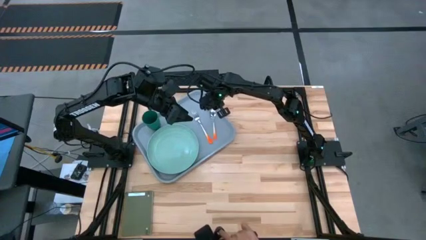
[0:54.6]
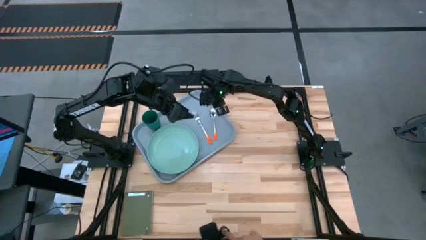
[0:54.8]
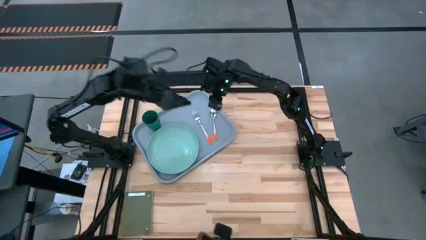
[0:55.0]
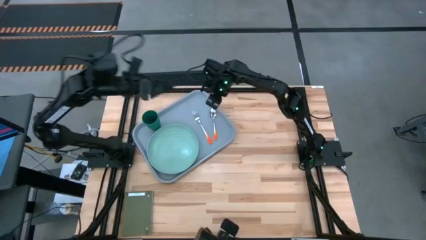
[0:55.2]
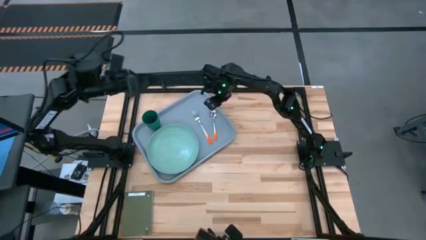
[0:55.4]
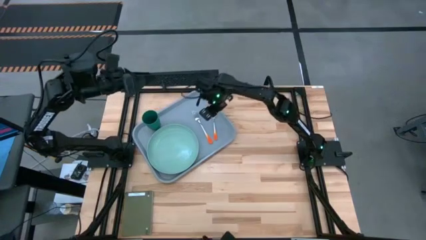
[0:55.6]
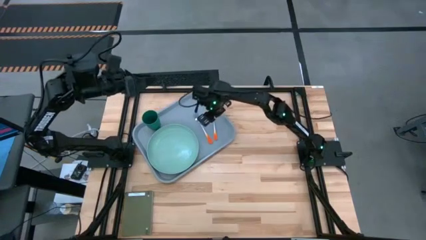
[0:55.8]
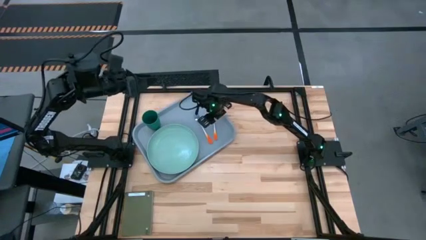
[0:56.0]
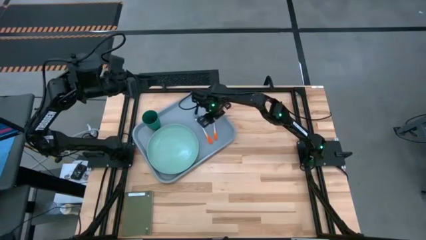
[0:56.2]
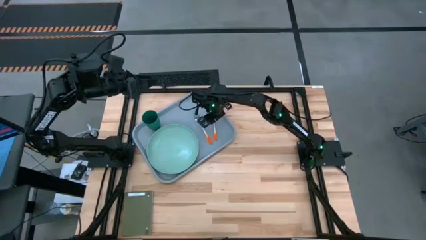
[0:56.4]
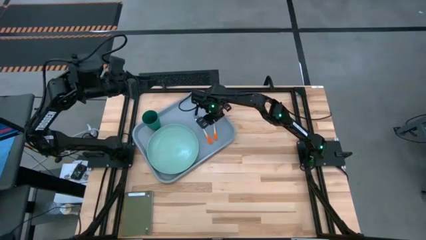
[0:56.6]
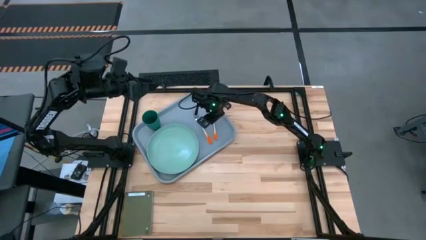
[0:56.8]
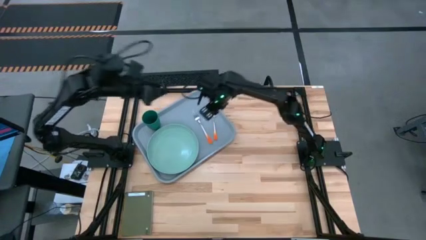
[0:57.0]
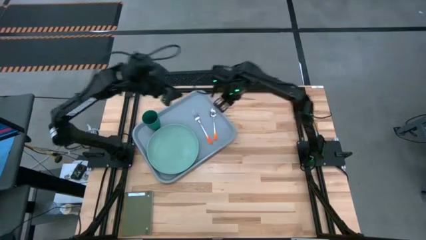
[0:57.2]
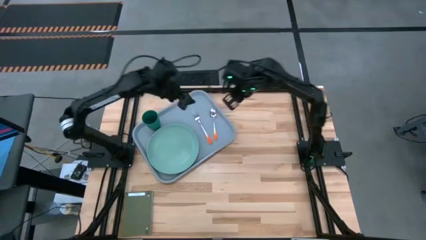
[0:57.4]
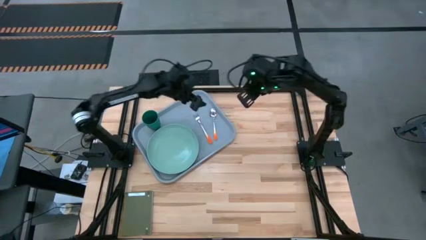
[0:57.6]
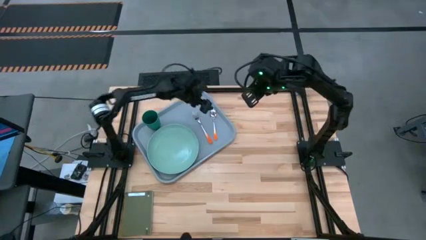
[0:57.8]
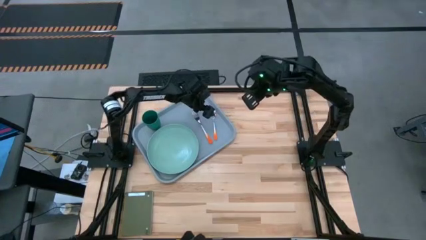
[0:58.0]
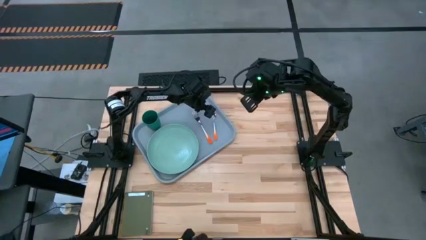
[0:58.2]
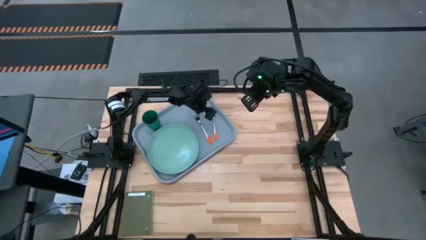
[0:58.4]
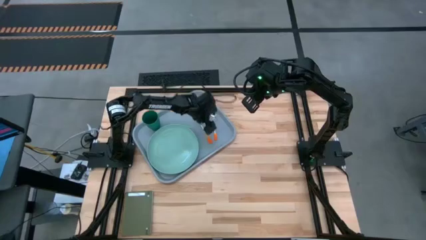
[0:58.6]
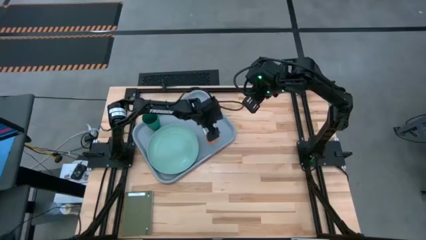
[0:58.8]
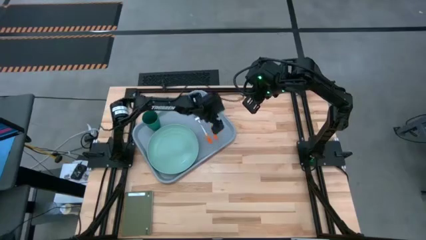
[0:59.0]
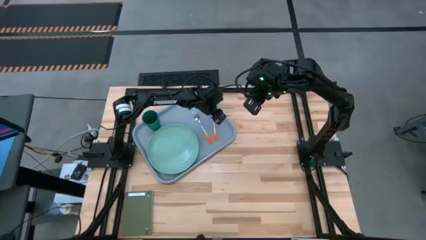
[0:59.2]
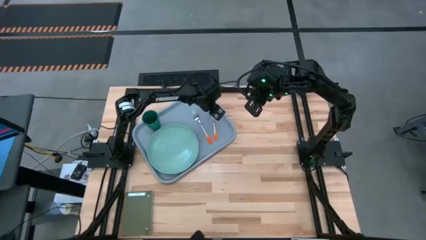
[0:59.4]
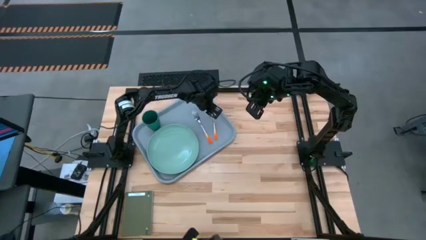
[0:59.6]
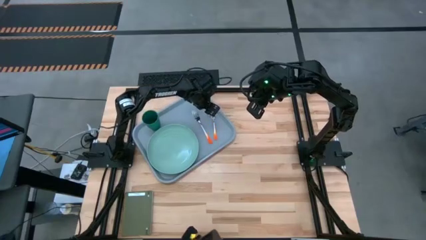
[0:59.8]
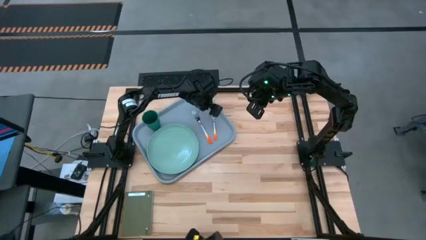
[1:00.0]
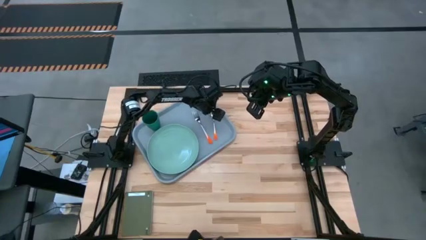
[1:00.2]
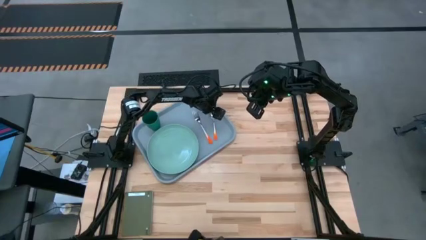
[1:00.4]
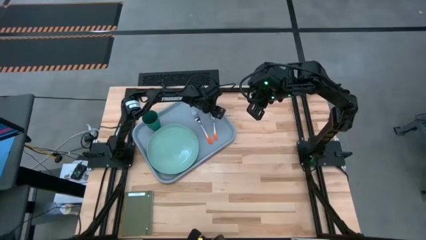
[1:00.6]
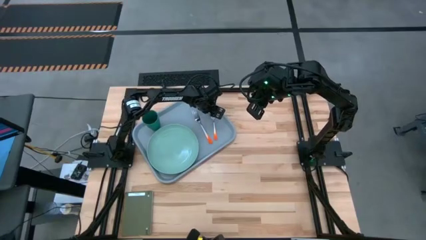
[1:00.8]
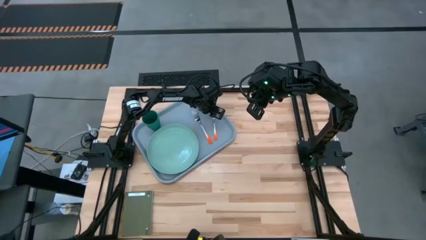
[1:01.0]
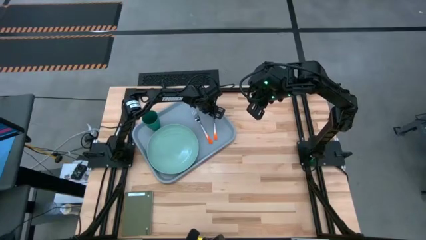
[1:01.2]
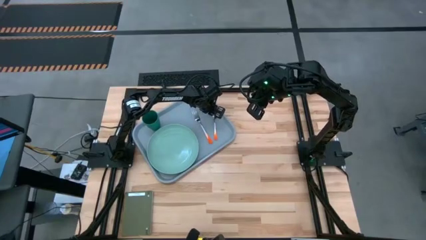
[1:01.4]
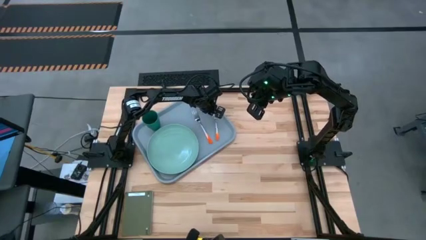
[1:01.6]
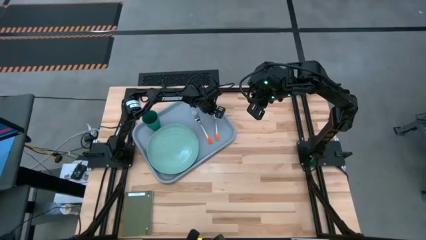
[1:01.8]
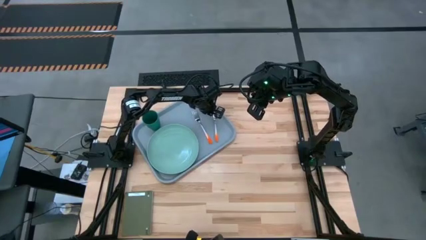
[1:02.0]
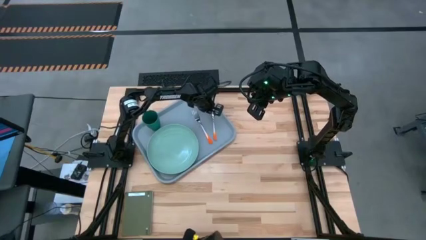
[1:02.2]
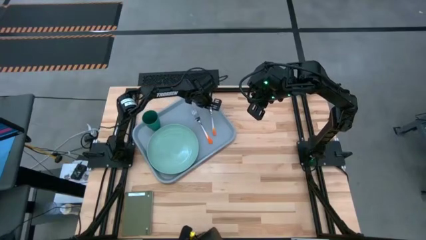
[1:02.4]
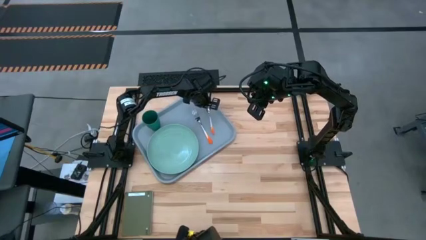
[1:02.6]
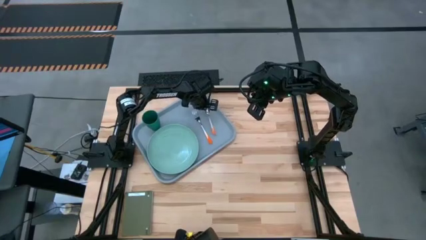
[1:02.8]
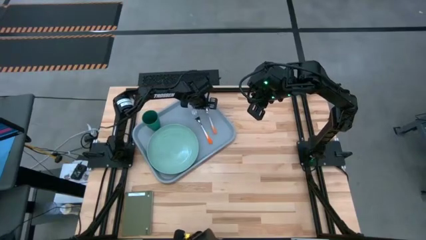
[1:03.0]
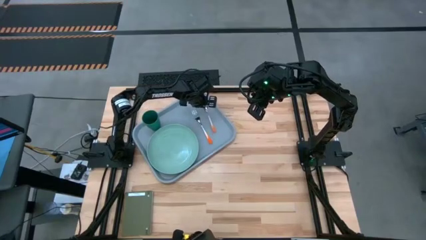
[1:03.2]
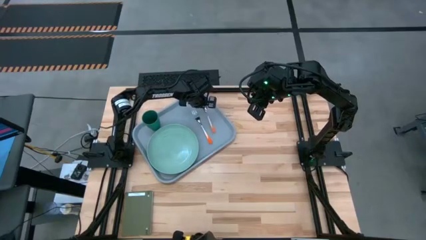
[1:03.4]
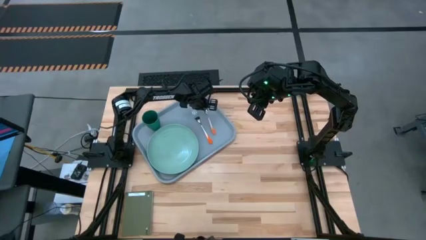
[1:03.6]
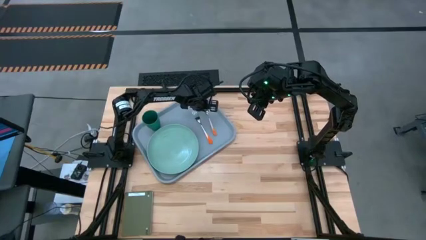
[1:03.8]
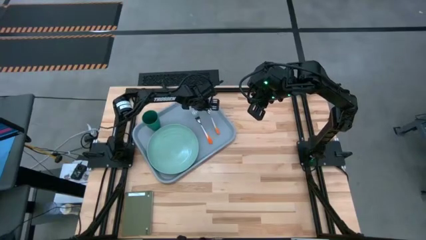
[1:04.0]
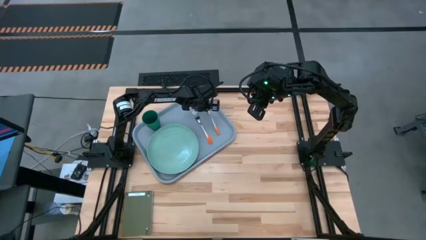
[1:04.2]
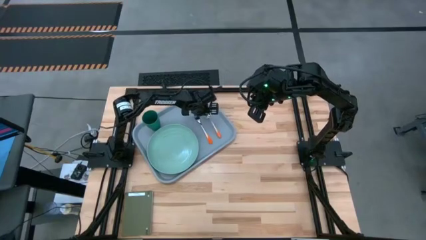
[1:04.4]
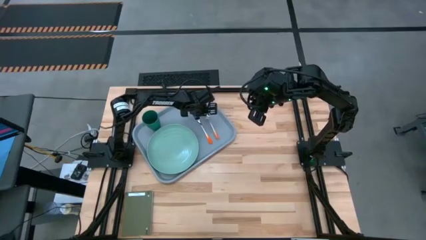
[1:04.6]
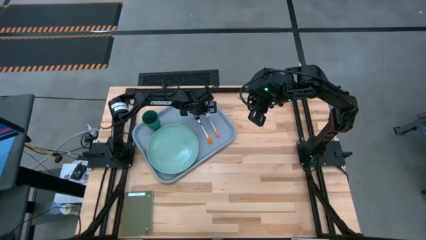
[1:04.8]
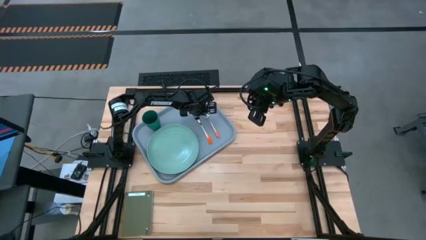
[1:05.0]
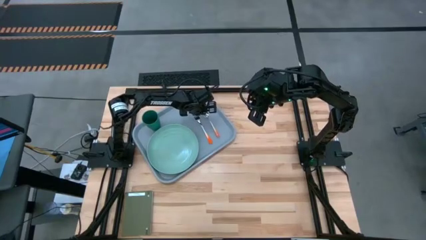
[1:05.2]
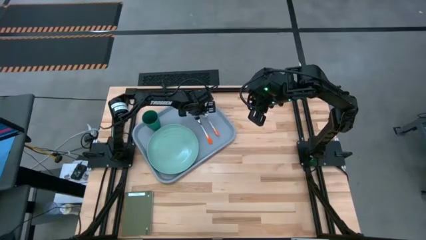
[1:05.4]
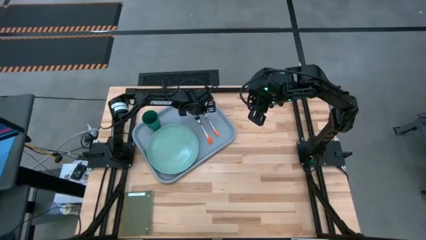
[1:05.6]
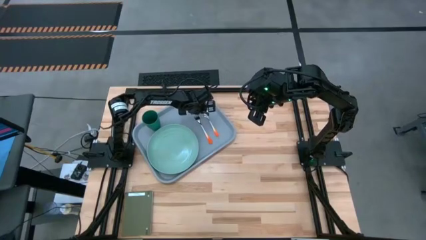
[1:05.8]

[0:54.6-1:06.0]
Task: Pick and place plate/cup/fork/spoon on tray
Adjust the spoon on the gray tray to the right of the fork

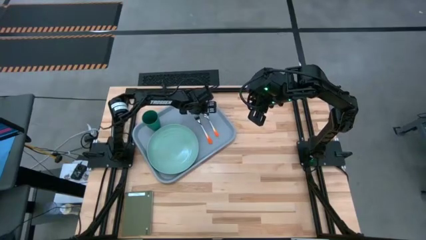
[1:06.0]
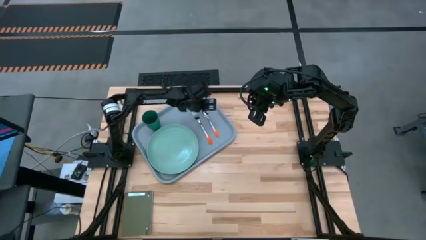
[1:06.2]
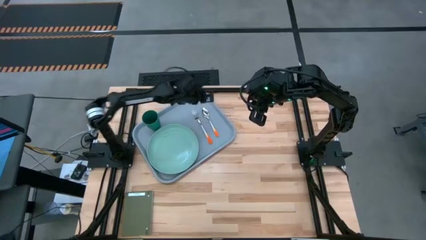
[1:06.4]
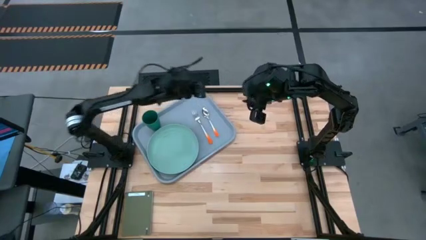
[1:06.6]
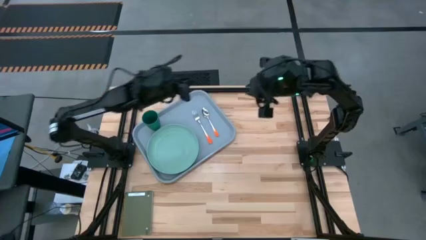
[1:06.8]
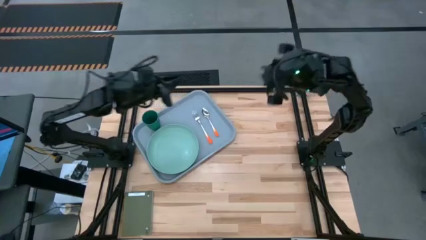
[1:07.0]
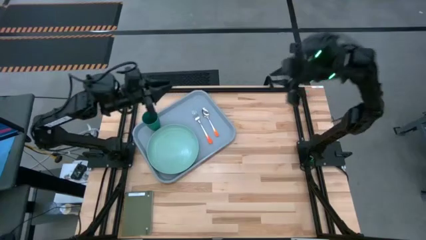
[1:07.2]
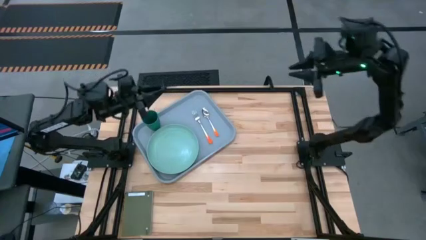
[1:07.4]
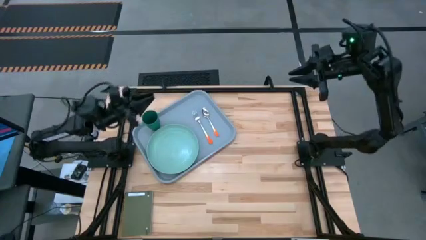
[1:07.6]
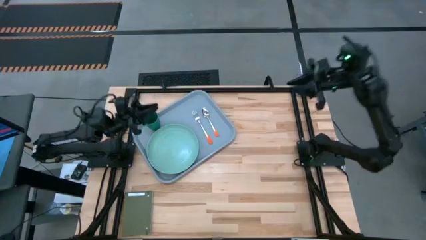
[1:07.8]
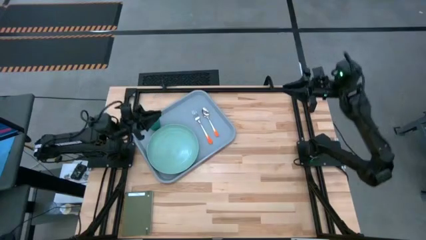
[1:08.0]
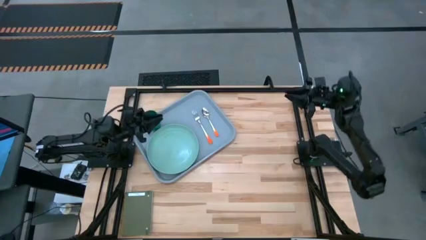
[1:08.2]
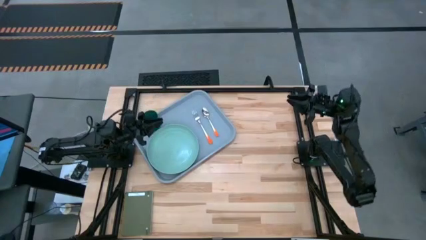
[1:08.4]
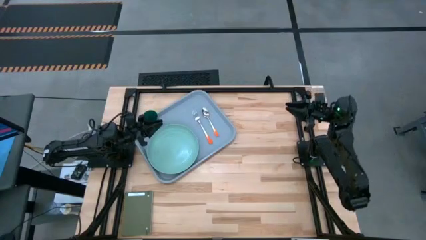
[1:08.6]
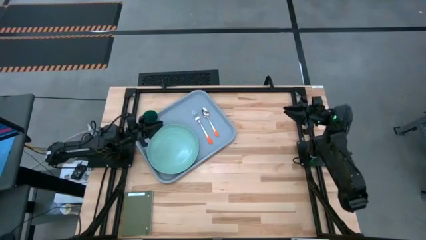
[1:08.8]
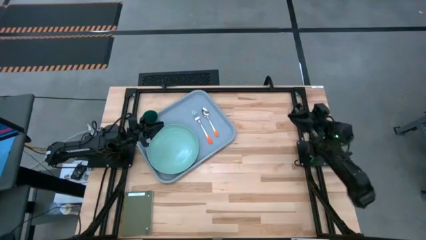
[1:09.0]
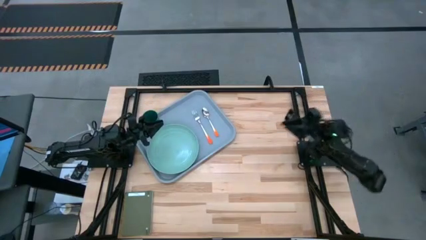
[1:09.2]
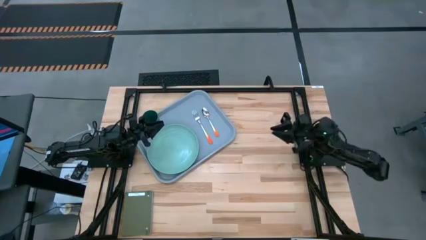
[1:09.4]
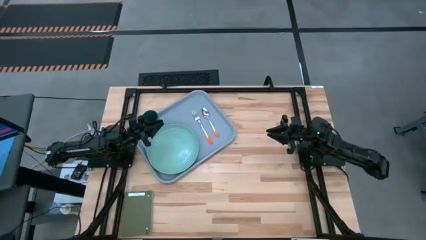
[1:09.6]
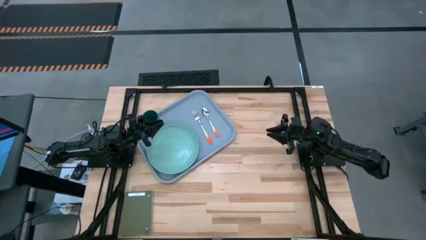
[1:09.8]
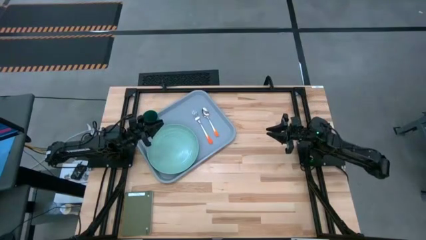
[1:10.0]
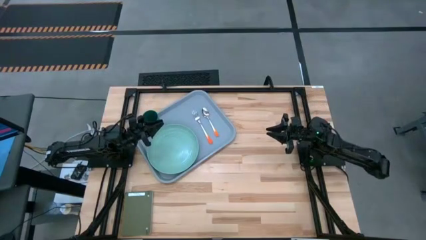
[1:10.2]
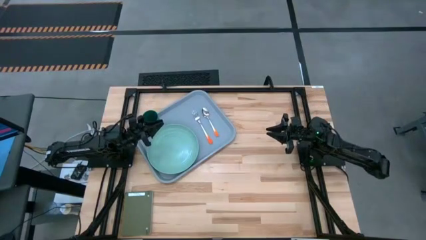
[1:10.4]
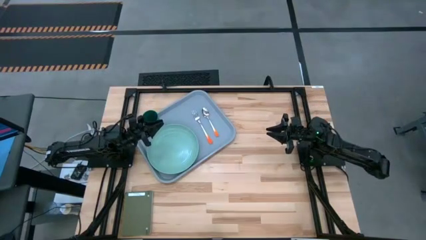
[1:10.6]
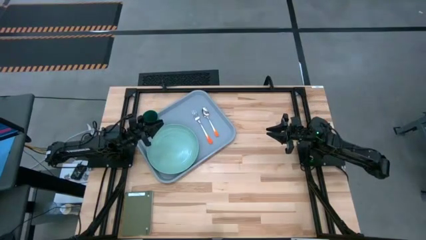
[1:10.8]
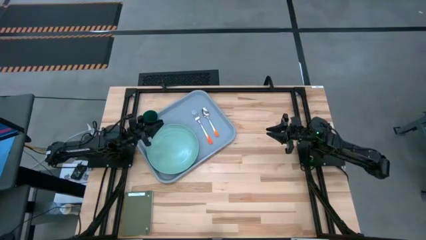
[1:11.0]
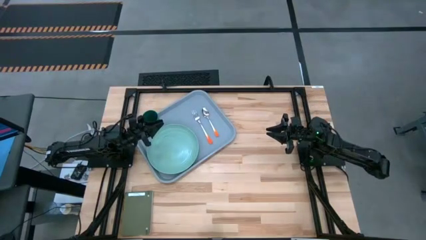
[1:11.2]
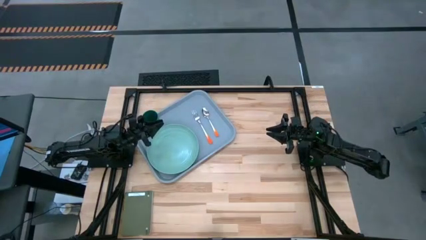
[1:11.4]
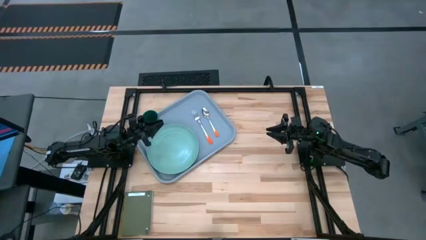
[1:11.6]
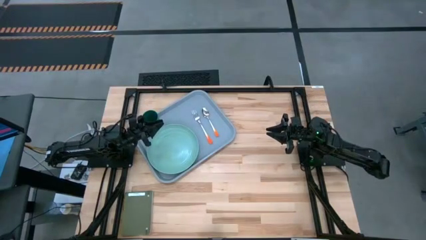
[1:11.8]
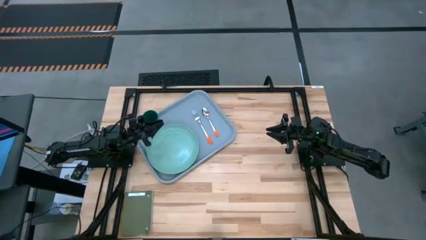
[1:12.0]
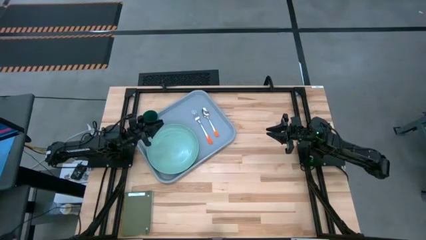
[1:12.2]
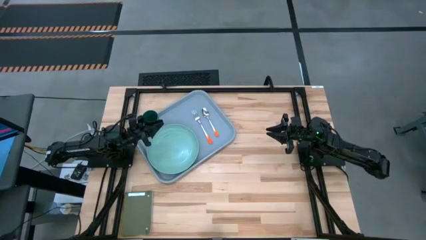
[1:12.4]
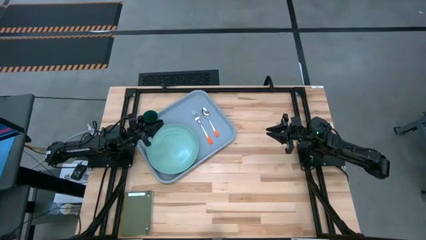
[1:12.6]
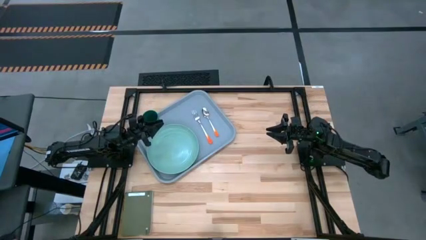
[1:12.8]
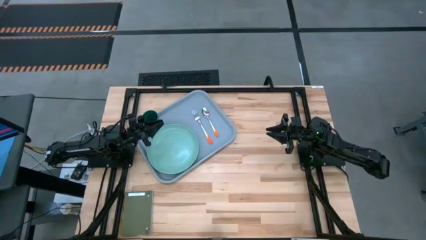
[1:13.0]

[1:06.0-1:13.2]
Return to Home Position
